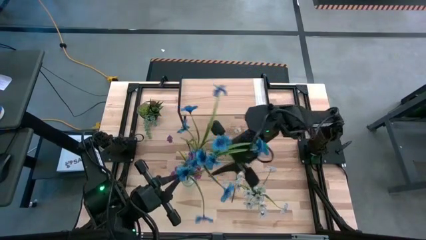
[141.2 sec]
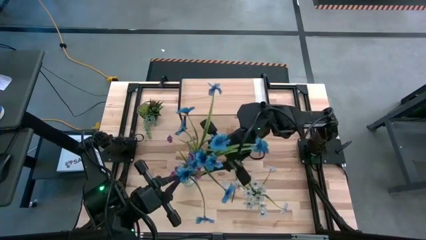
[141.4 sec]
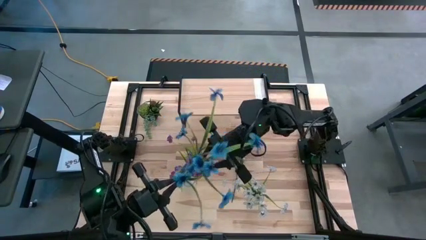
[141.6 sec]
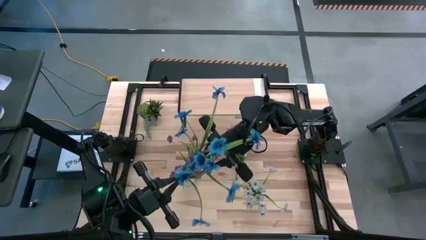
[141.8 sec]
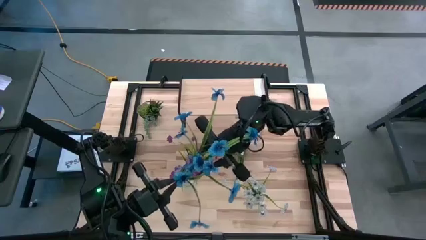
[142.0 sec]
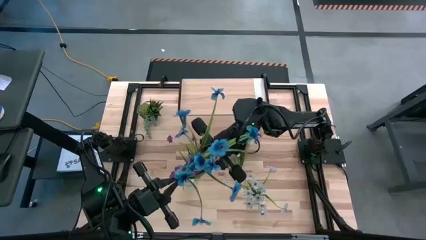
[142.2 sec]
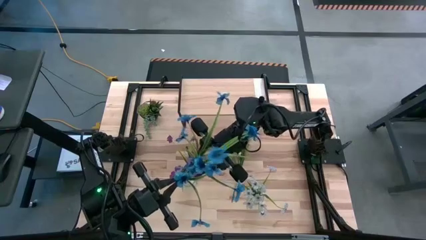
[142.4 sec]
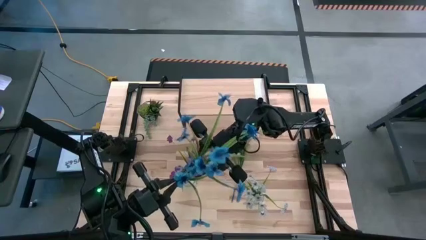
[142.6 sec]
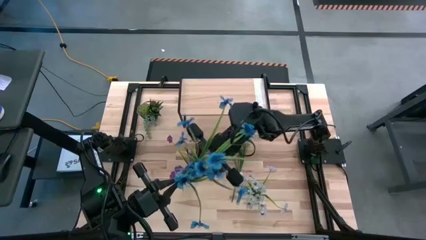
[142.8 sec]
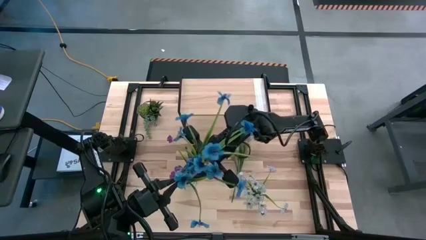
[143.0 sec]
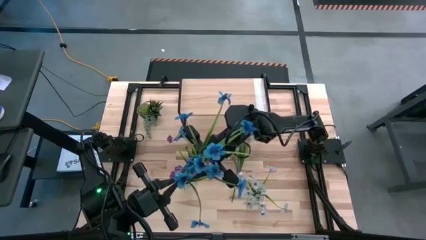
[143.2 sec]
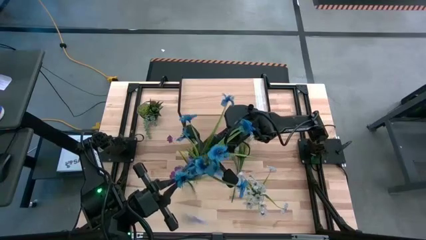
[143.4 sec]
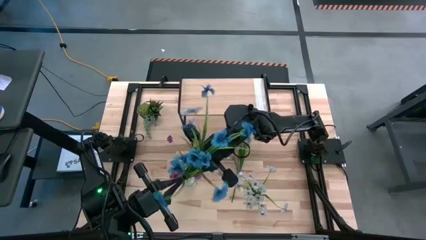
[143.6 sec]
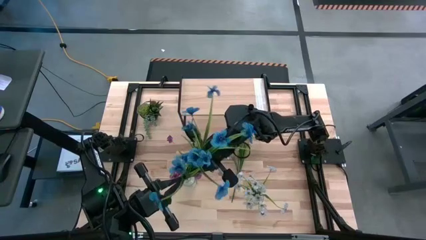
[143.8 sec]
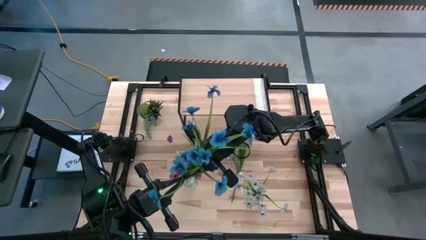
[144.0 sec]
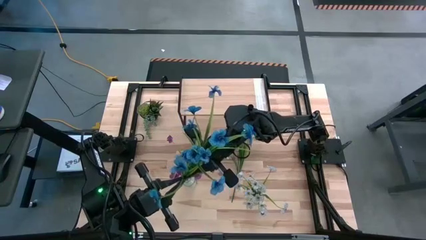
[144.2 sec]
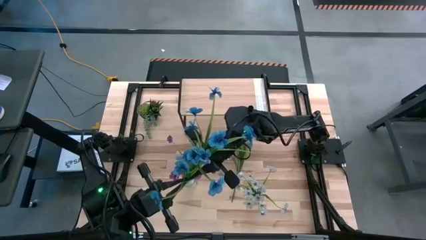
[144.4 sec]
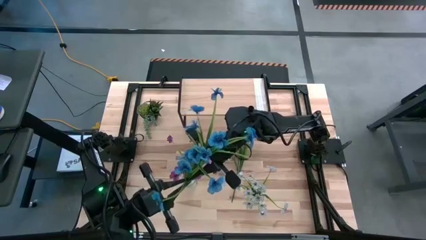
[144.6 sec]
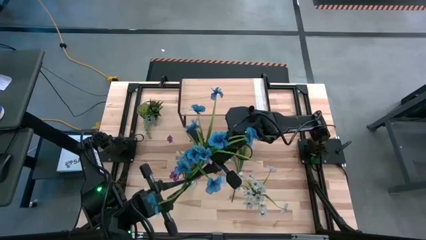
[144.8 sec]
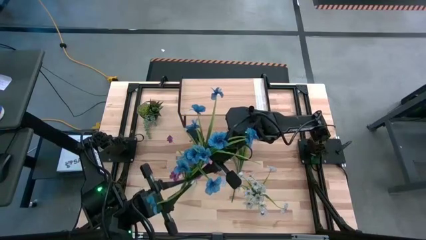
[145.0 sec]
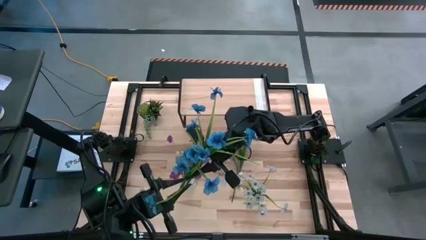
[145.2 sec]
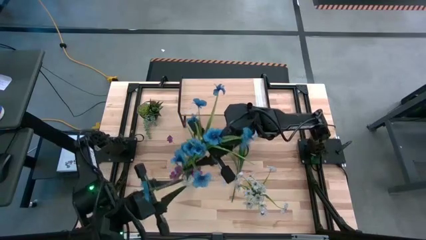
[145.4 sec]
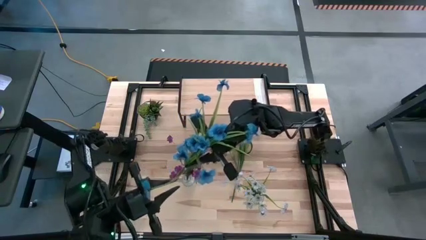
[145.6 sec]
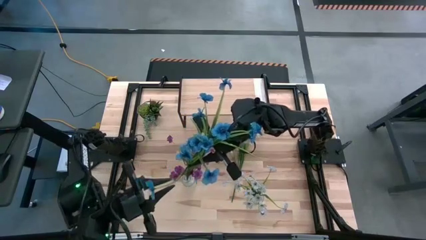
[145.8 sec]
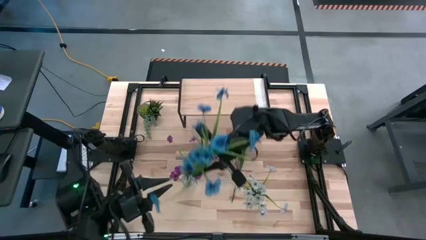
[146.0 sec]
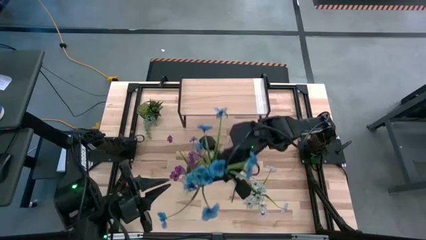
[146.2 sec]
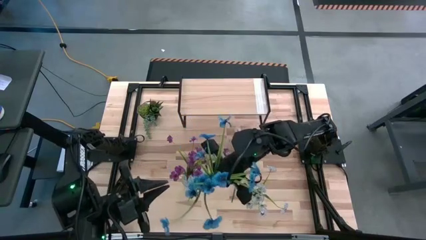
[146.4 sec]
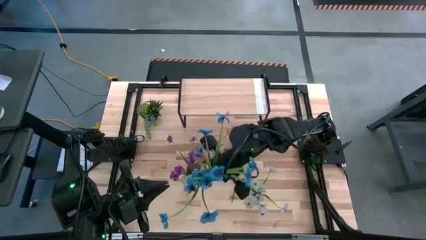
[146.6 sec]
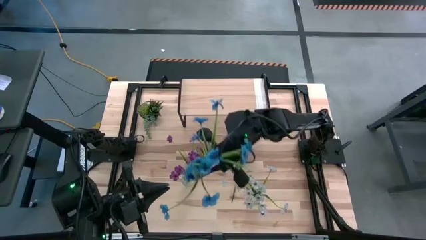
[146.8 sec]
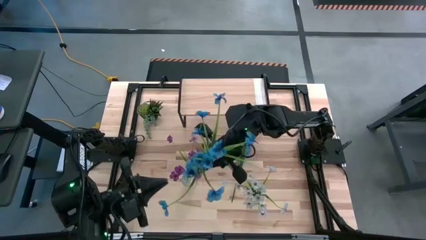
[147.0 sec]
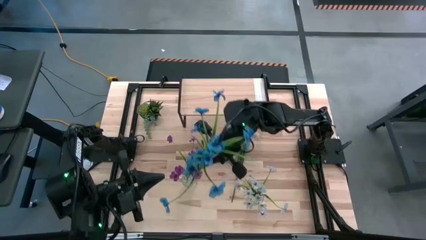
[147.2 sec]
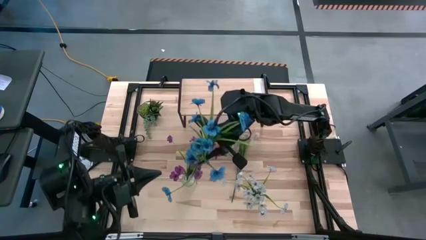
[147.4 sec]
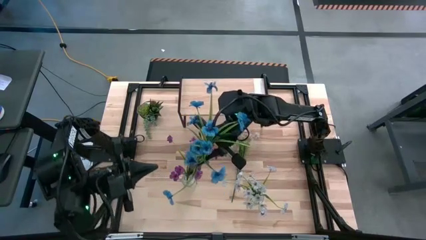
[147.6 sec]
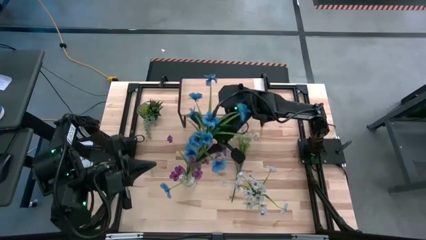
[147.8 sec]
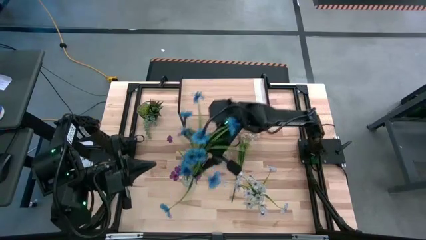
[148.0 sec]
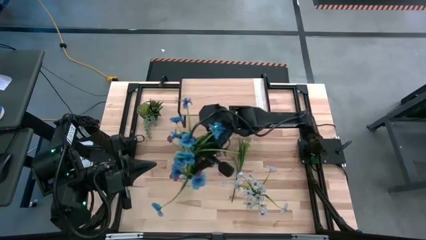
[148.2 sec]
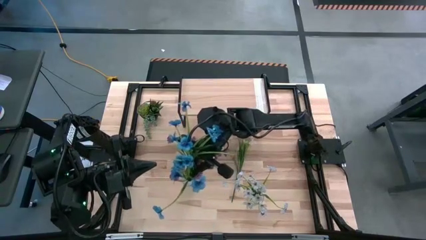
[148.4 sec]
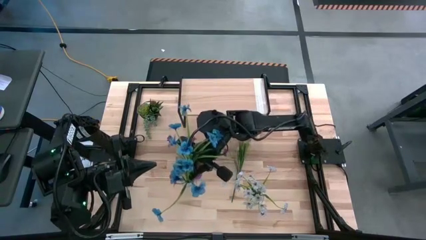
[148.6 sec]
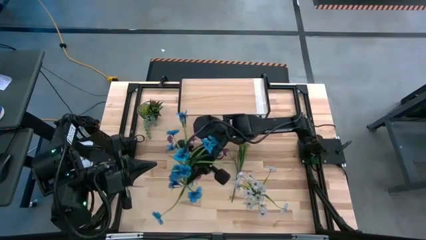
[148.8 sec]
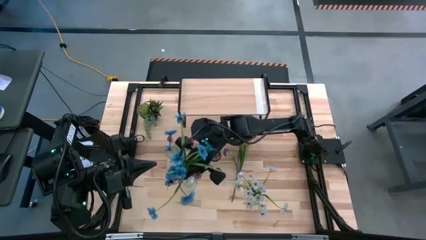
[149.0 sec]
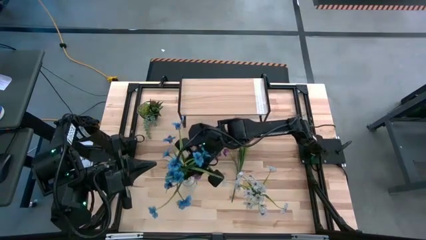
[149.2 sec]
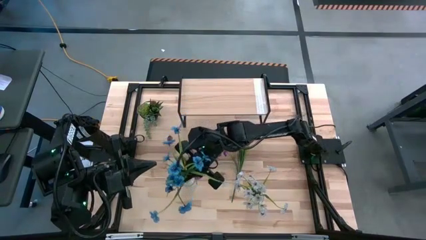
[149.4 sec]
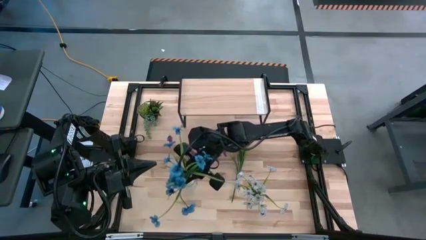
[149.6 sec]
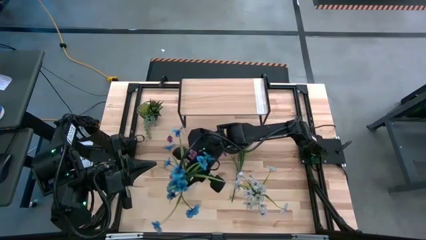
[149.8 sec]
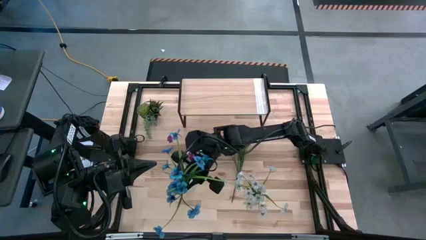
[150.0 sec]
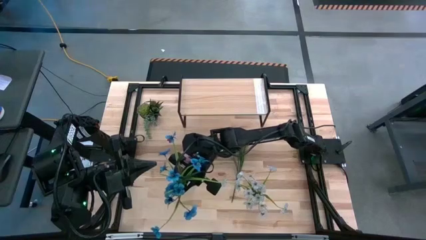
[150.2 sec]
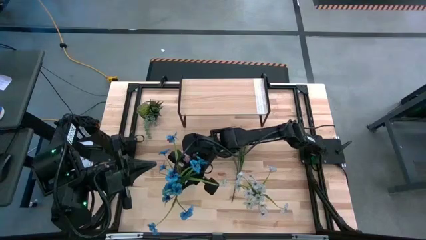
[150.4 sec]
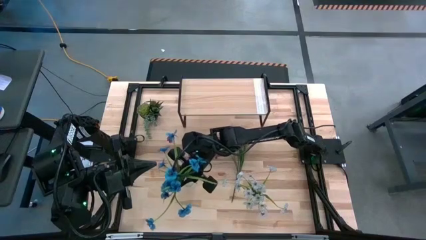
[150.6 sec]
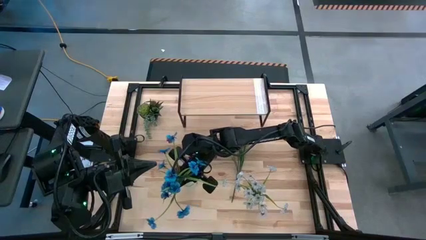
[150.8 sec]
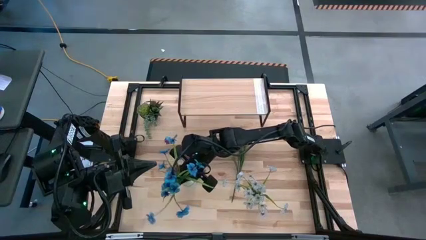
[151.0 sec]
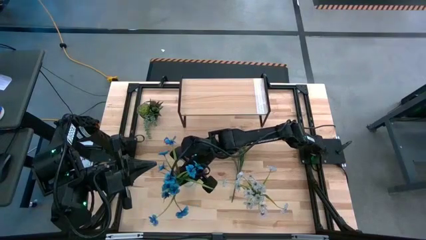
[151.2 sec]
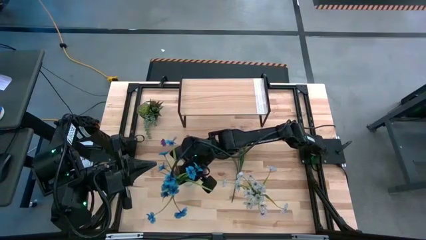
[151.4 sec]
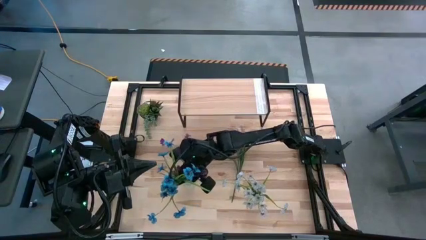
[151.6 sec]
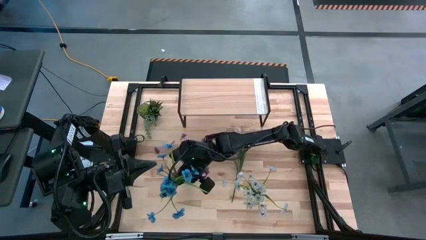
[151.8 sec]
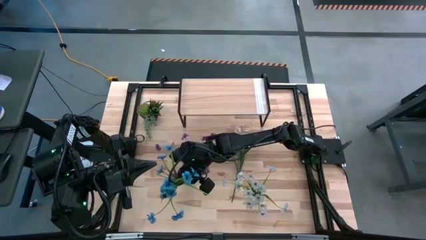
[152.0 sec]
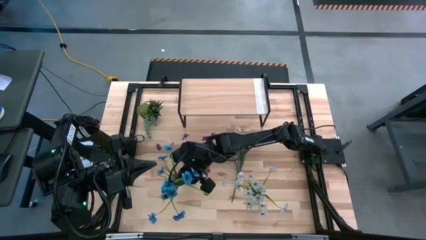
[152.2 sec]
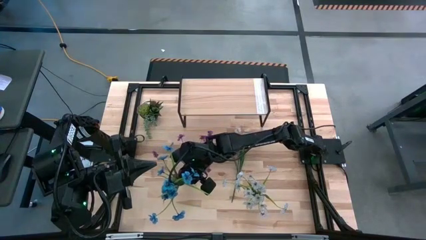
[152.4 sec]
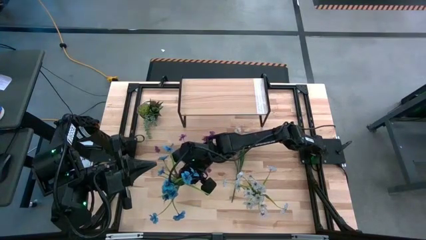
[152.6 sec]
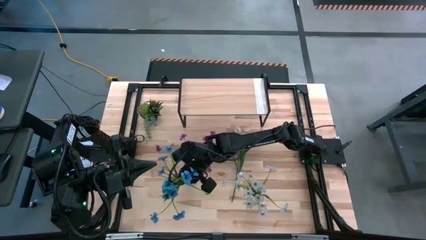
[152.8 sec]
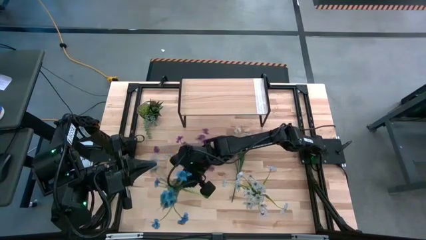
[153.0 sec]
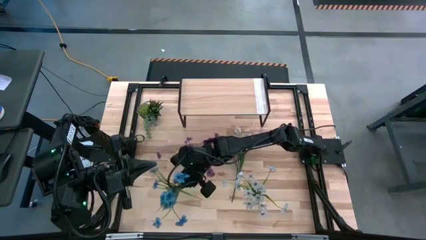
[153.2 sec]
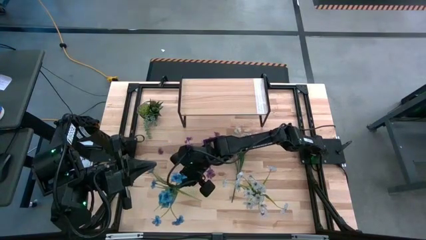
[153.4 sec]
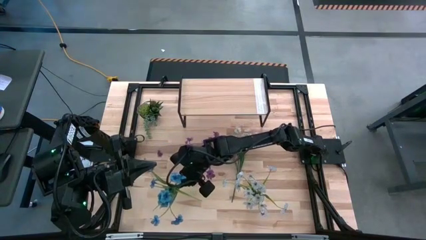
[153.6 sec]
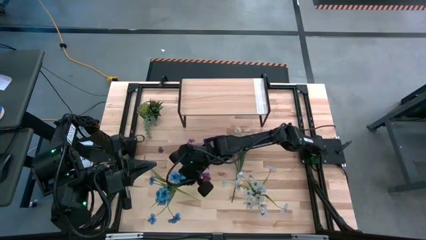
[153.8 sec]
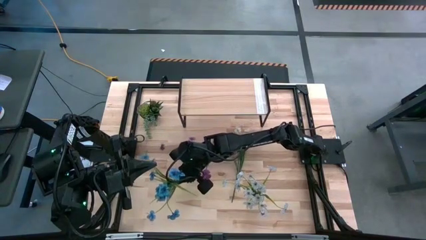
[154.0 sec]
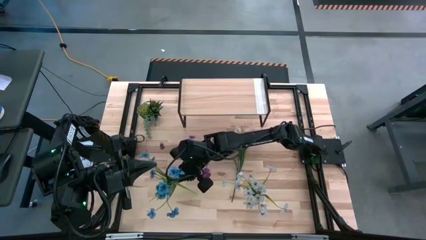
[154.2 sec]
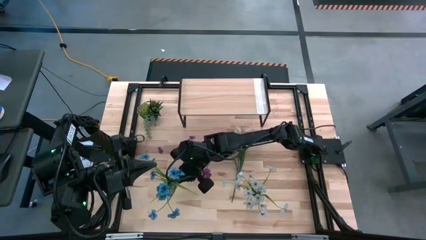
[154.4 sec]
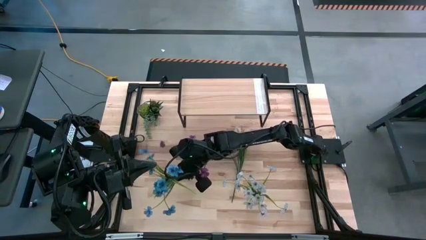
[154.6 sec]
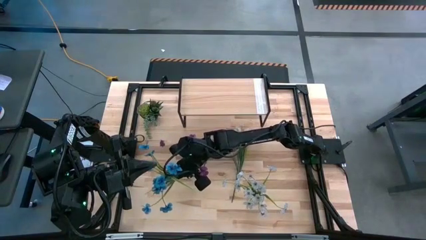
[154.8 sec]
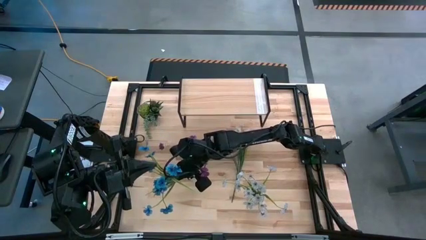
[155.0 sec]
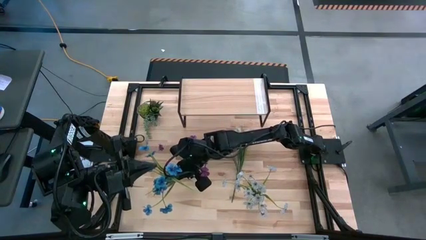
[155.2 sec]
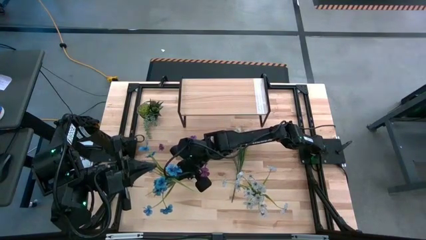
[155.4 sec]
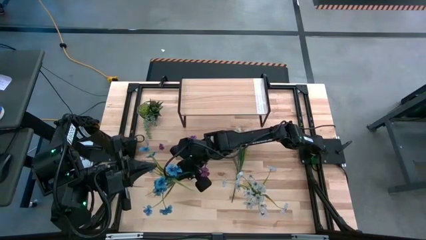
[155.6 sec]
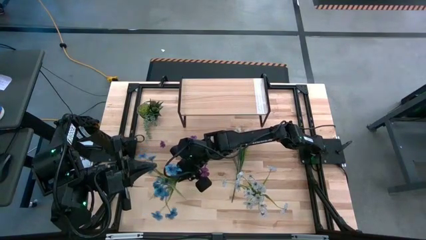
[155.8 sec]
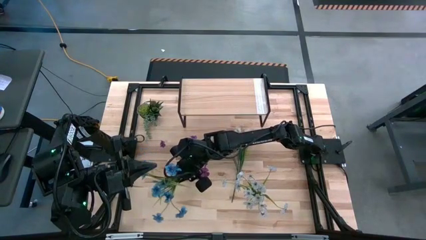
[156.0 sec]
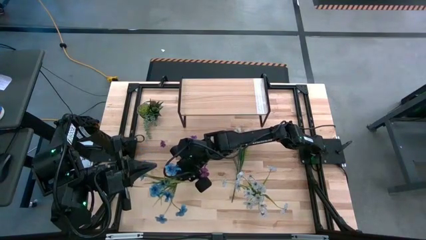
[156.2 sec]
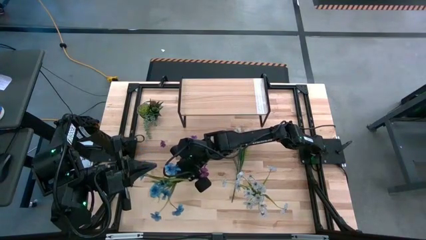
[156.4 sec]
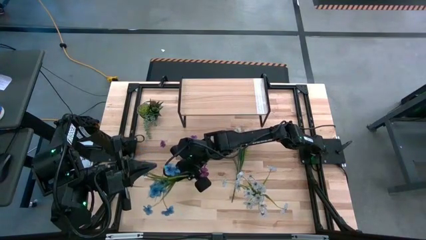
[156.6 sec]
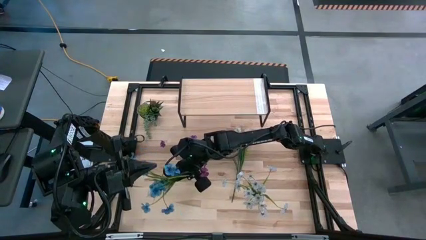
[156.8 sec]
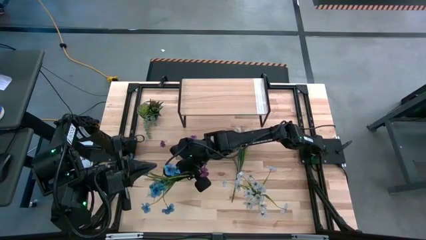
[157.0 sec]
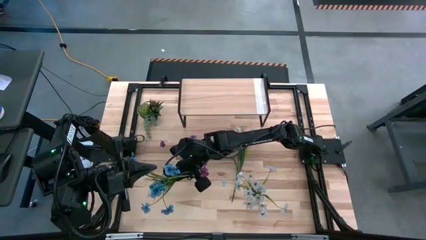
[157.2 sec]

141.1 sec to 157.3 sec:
Task: Pick and place flowers into a vace then onto a shelf
Put the blue flowers into the left transparent vase
